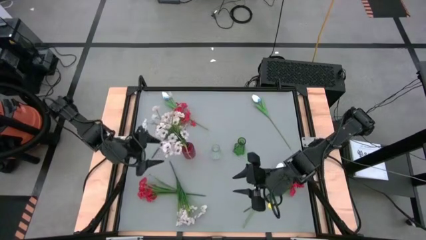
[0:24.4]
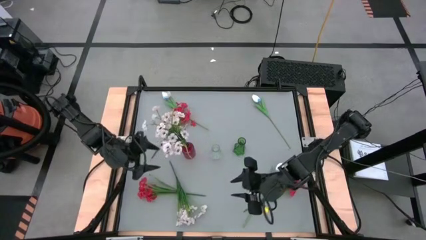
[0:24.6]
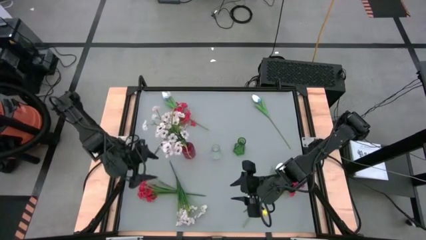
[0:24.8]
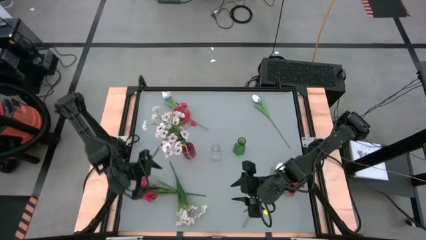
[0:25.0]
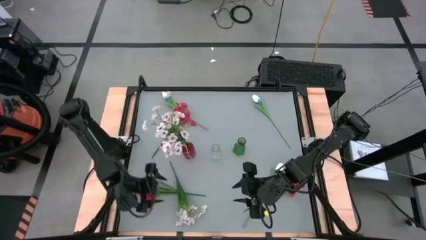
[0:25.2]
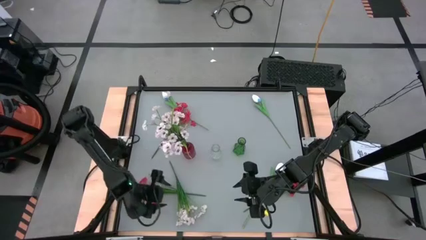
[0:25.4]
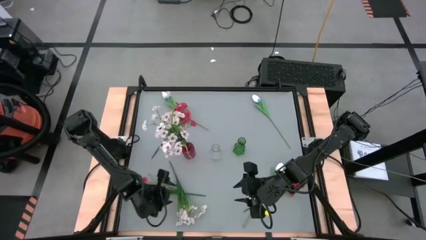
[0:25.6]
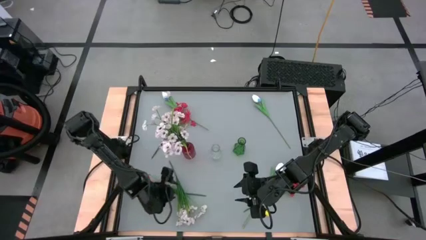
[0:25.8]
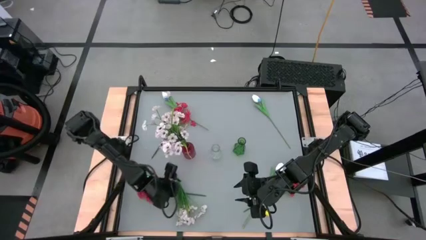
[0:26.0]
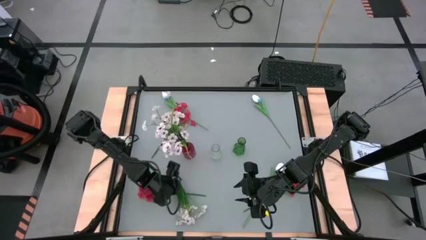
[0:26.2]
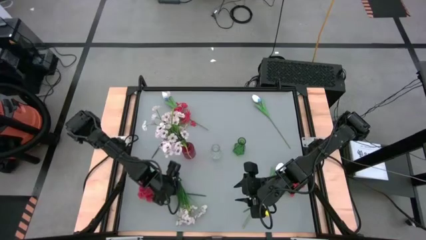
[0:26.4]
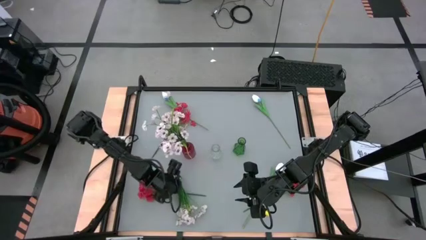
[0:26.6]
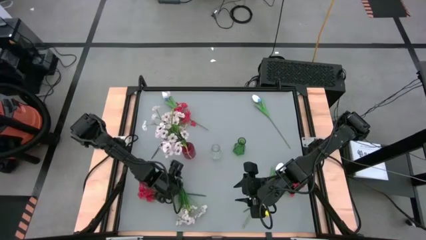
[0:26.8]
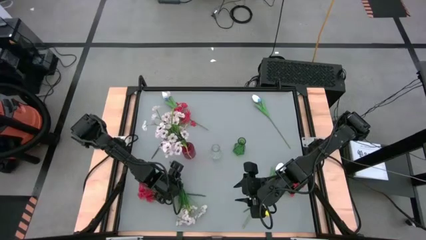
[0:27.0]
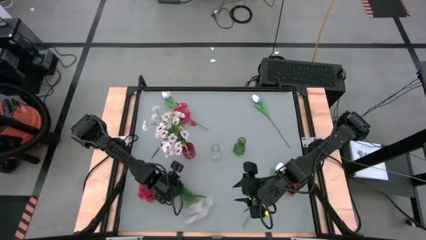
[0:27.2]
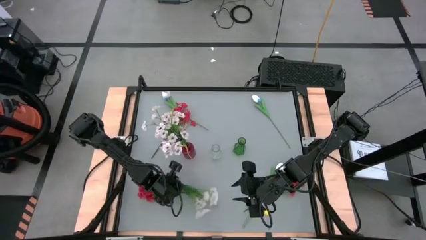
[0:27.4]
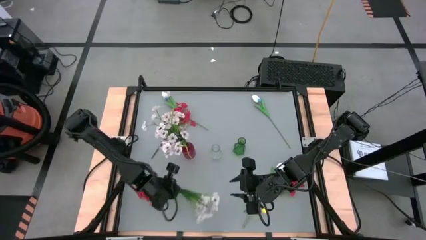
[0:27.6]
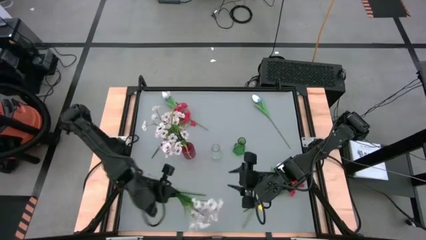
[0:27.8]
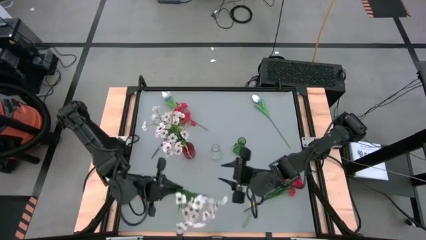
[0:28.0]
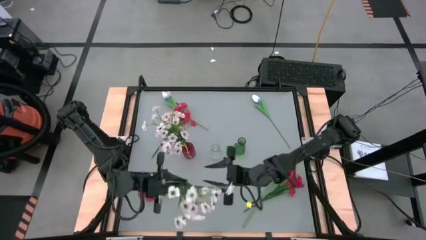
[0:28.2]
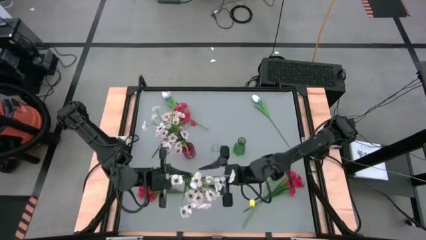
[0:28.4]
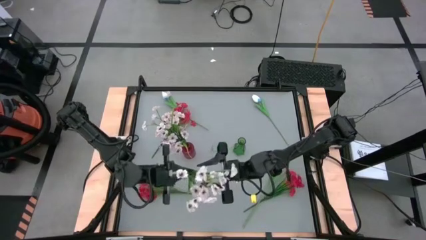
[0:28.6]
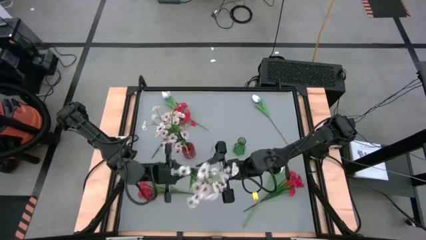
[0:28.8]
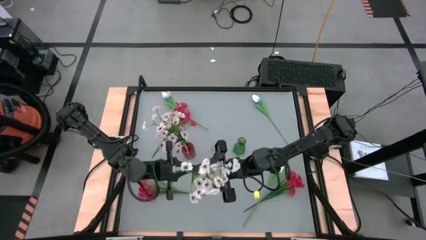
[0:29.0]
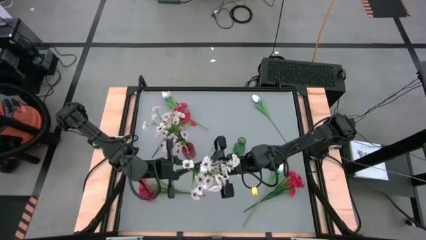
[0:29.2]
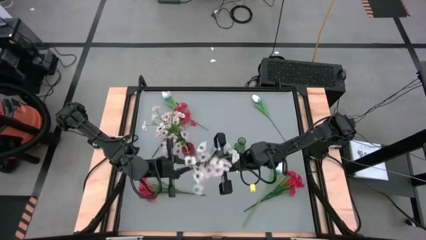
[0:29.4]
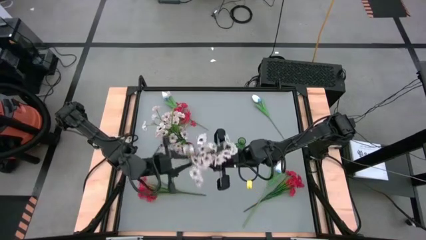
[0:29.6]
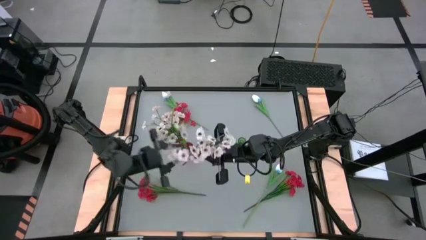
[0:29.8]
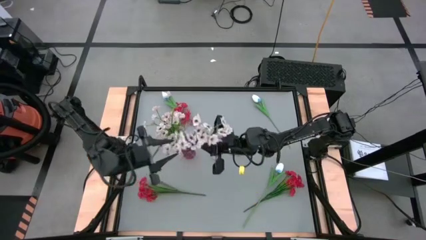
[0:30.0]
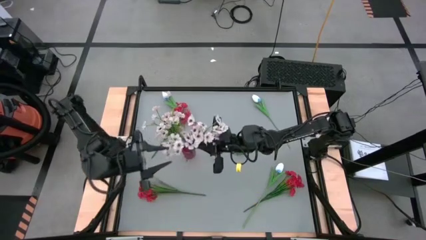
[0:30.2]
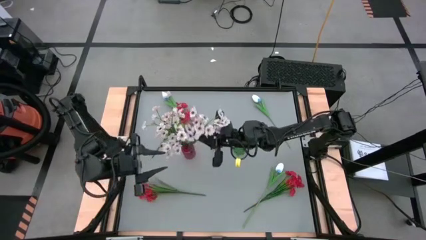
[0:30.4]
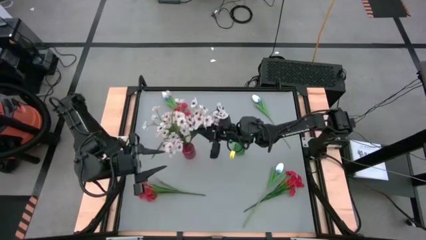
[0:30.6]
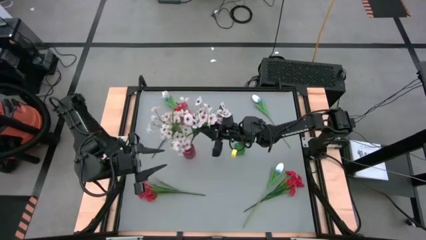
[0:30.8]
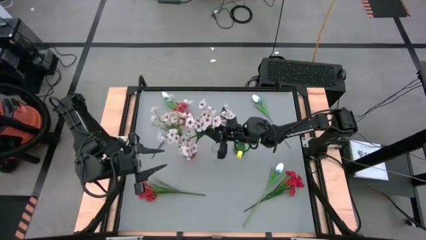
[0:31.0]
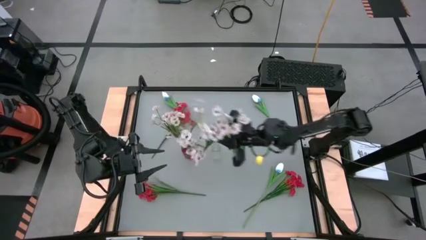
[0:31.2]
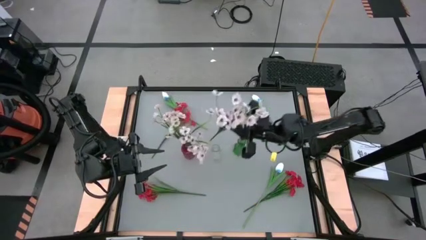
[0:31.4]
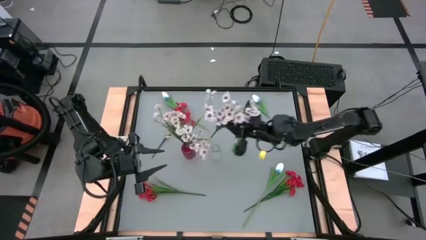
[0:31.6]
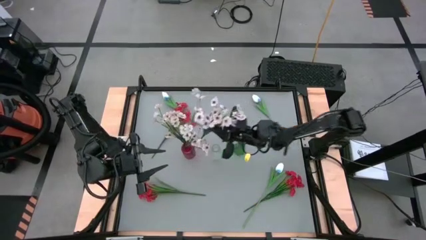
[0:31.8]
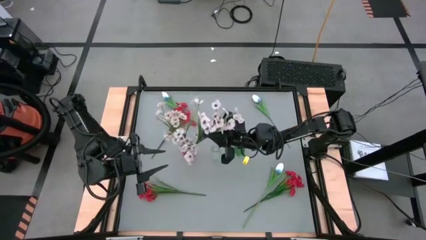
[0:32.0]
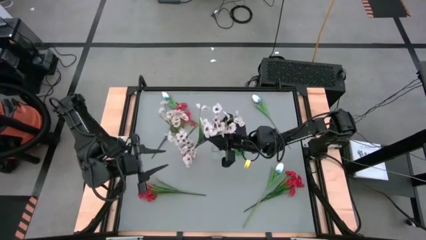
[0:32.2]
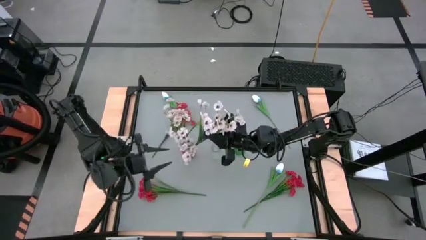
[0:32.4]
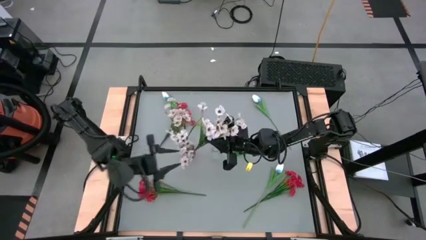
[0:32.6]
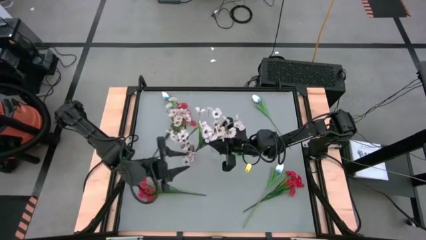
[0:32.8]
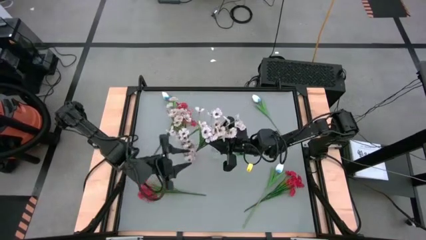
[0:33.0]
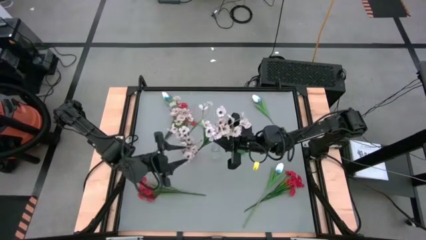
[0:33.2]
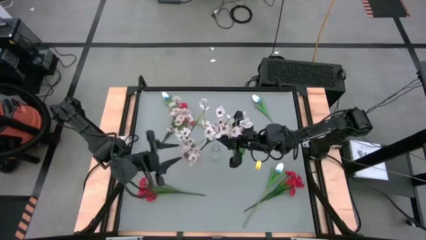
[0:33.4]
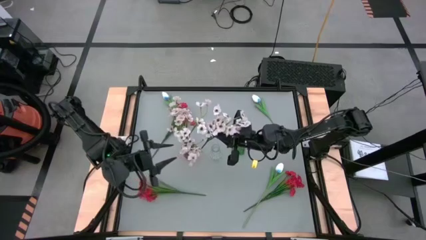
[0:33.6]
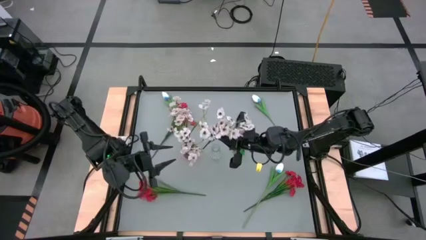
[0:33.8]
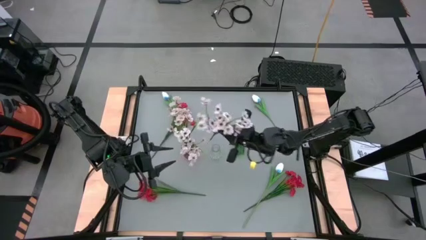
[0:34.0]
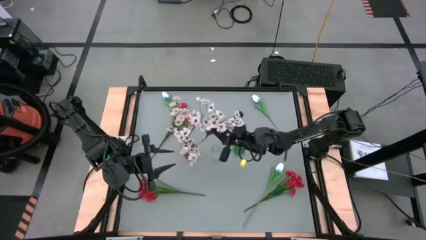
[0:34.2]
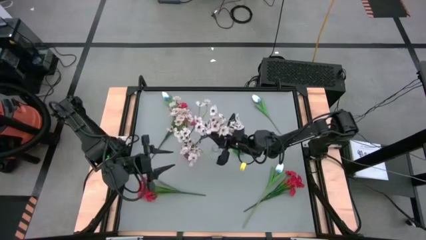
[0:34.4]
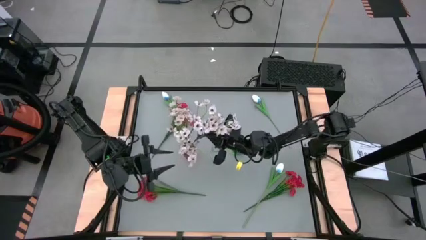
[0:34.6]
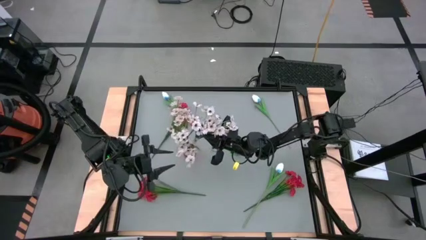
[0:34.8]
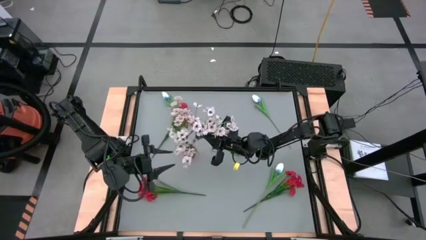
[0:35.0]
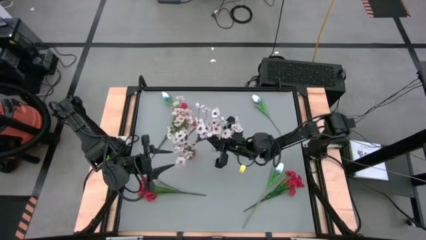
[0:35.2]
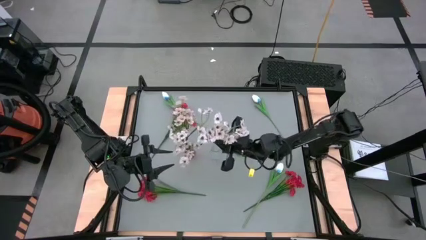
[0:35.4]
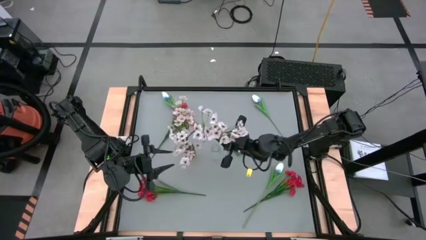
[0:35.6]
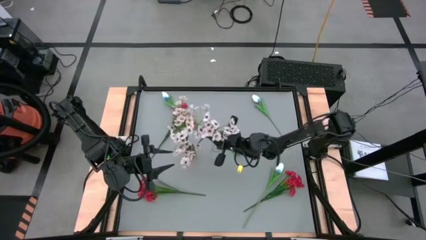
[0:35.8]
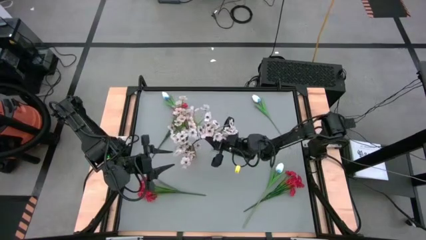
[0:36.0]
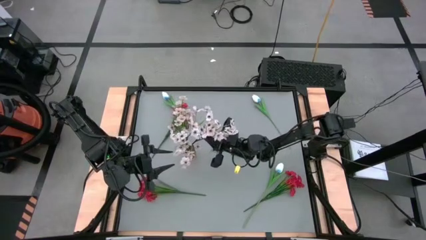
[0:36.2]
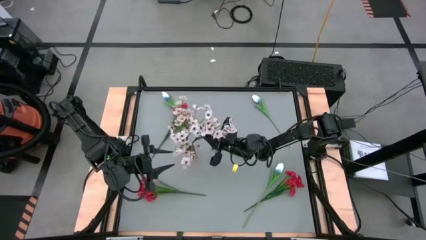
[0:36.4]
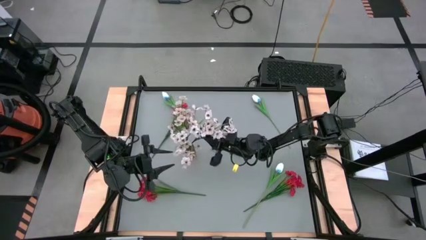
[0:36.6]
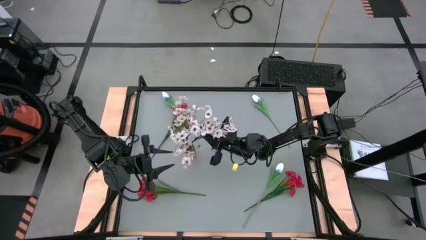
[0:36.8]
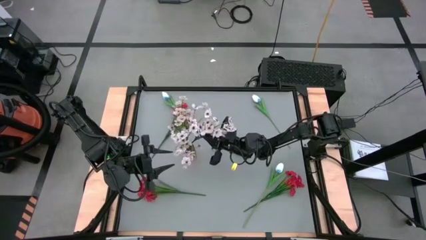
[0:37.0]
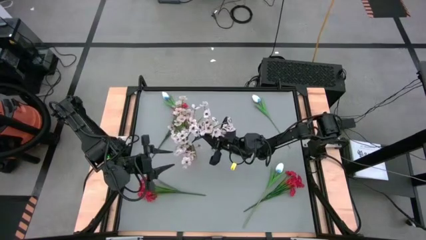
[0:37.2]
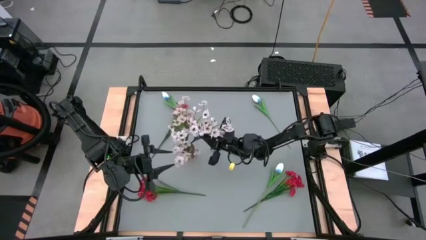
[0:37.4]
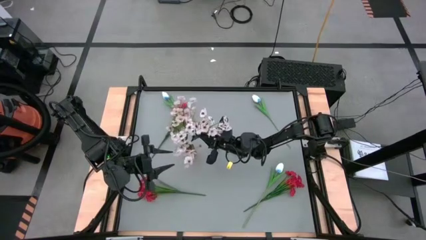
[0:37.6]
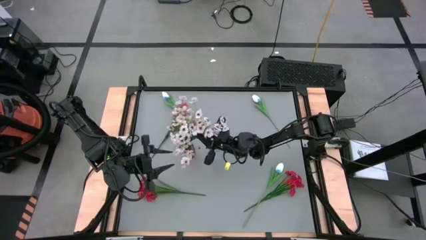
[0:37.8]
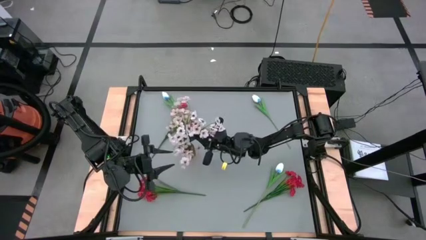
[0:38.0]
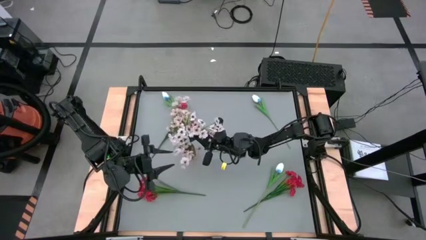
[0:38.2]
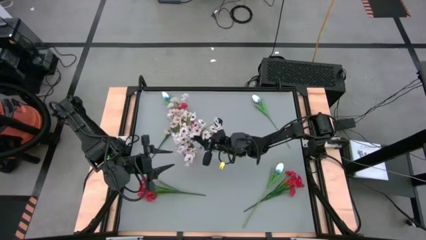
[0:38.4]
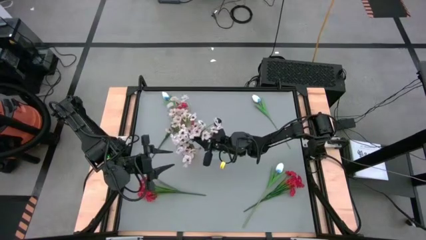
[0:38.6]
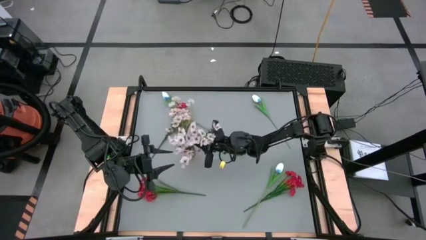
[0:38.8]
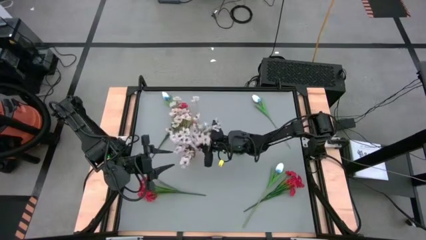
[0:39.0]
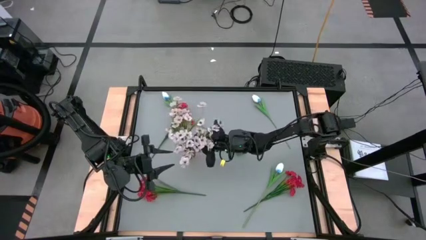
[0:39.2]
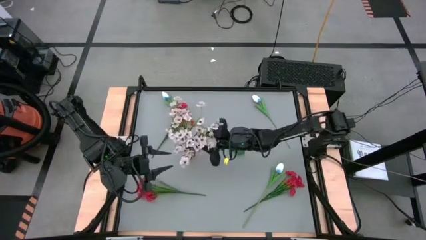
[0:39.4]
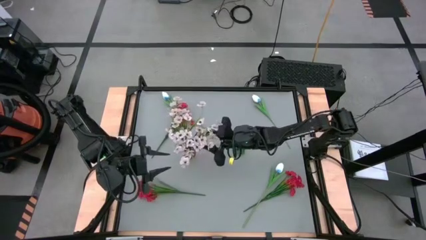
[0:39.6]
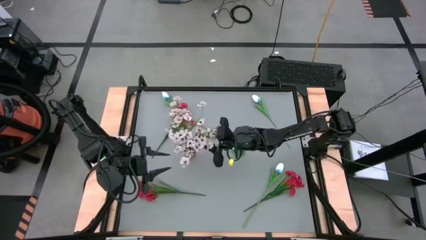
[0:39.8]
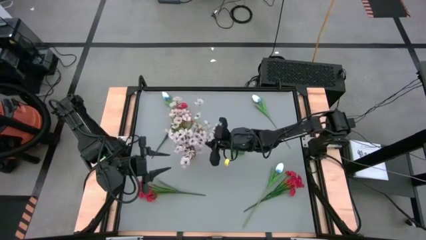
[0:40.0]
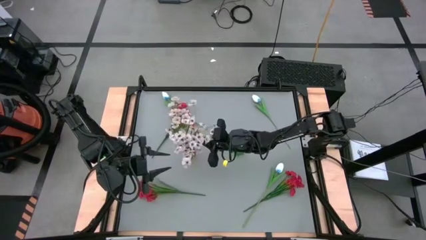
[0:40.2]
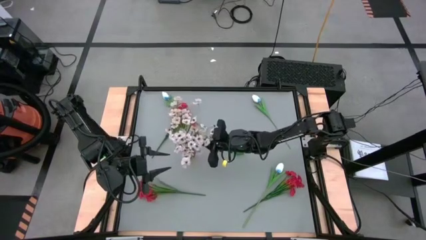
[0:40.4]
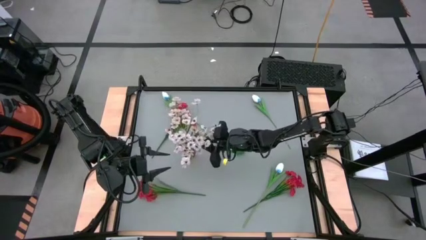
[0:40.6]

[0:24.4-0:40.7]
Task: Sort flowers into vase by color
Put the white flower into the red flower vase
